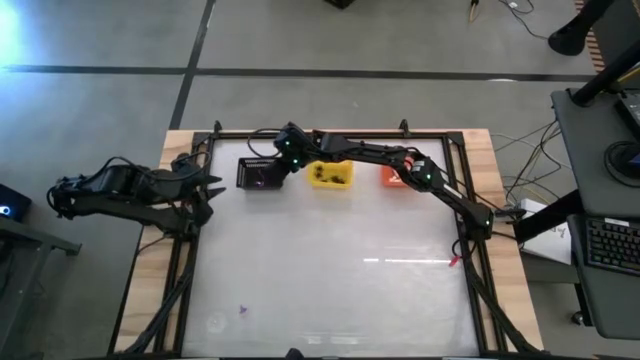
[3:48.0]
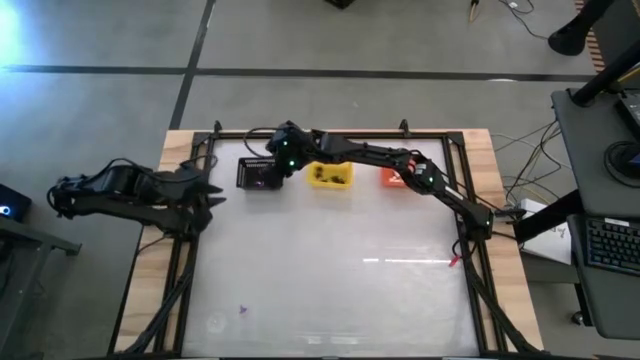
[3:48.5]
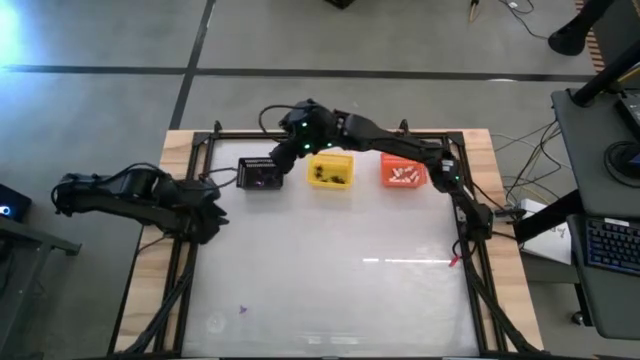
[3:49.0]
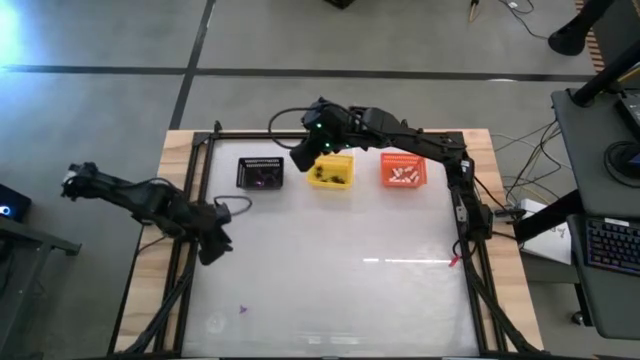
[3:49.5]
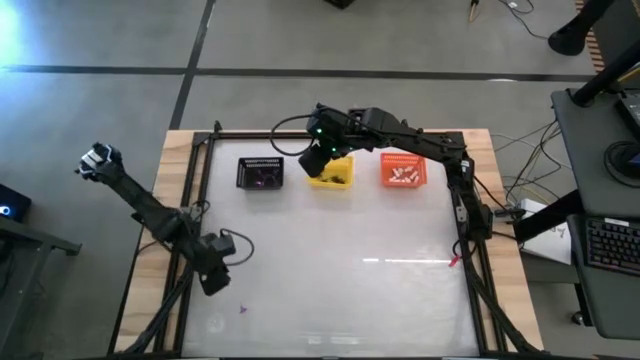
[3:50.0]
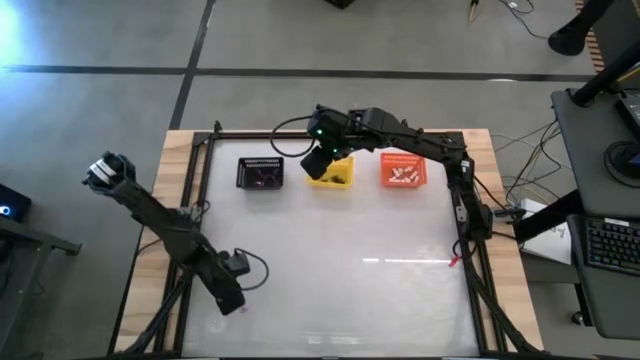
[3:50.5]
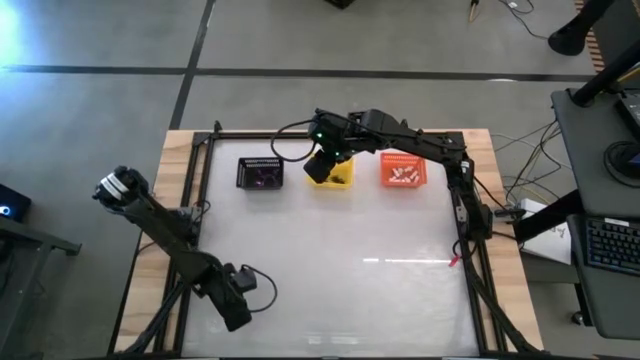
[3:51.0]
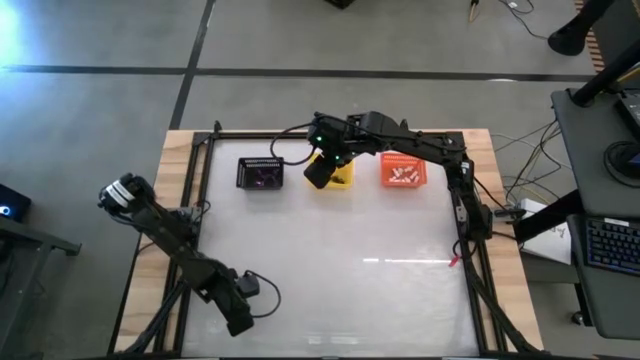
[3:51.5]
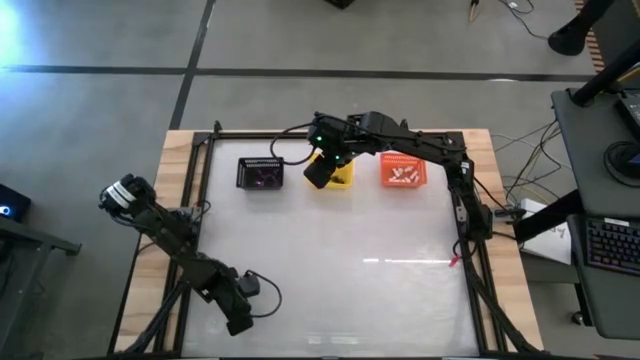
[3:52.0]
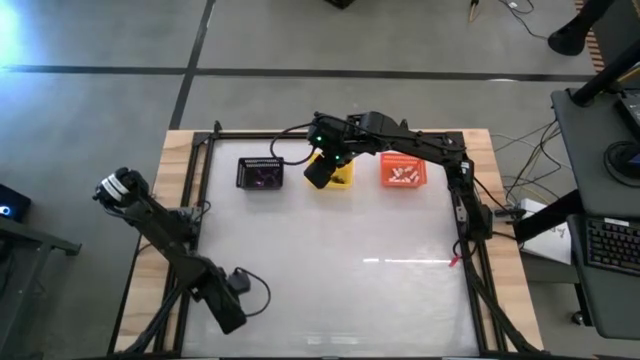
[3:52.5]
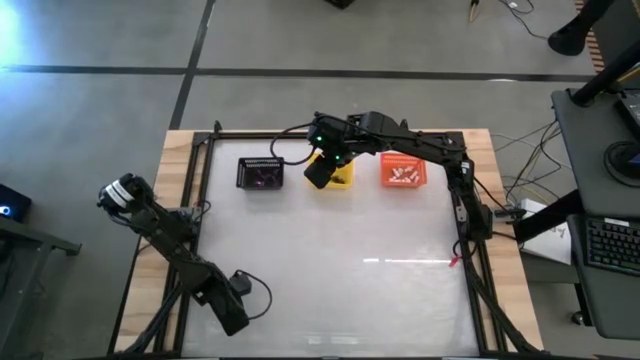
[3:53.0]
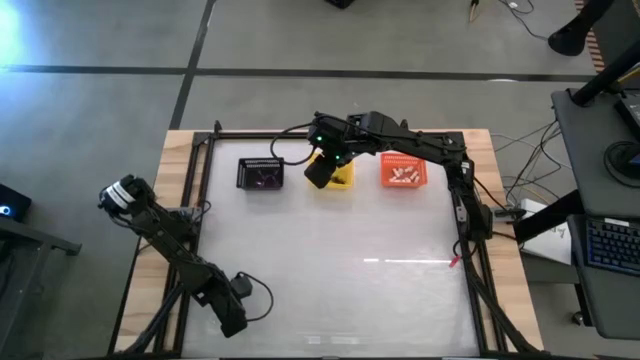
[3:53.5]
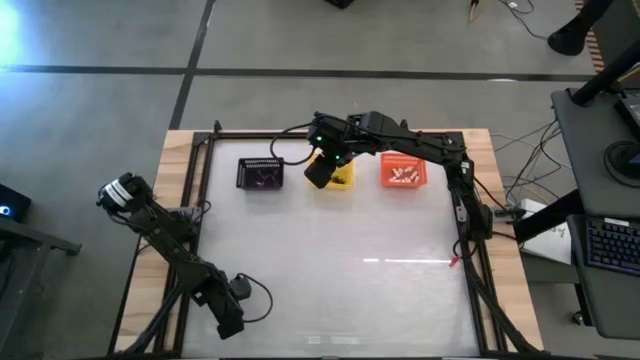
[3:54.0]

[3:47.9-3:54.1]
Task: Sort Halloween decoration
Put the violet hat toy into the black bin

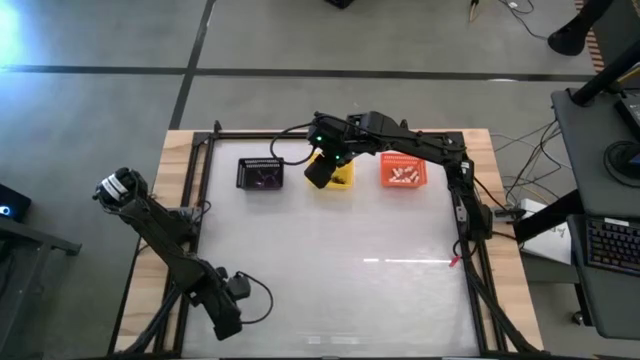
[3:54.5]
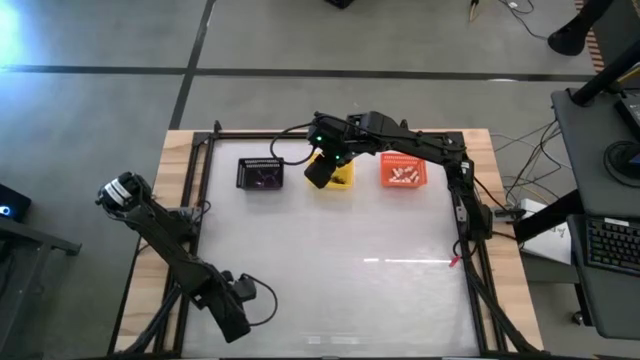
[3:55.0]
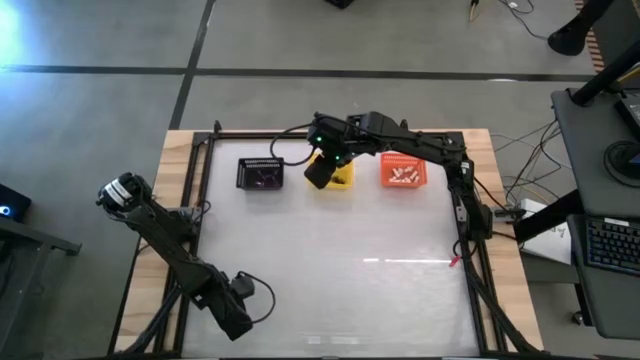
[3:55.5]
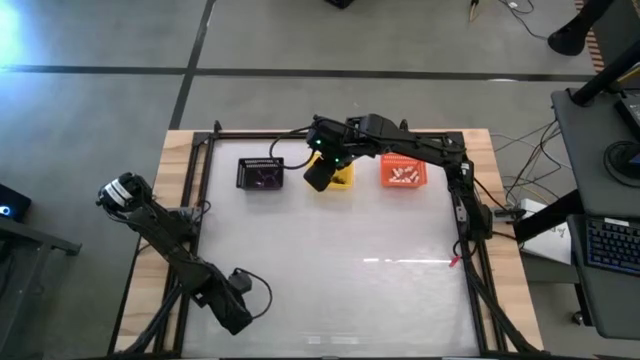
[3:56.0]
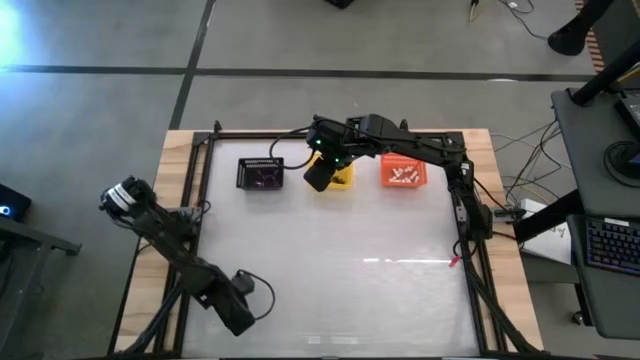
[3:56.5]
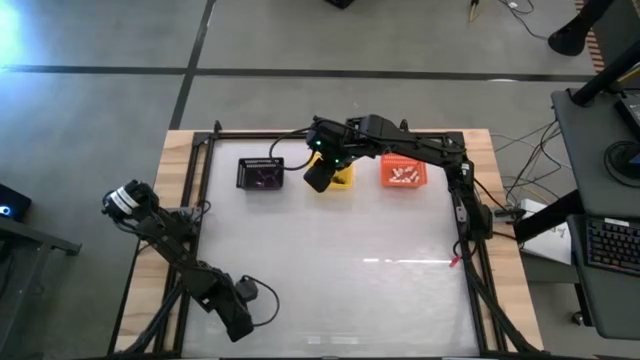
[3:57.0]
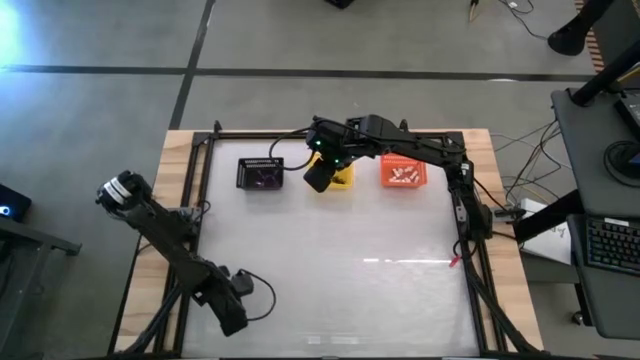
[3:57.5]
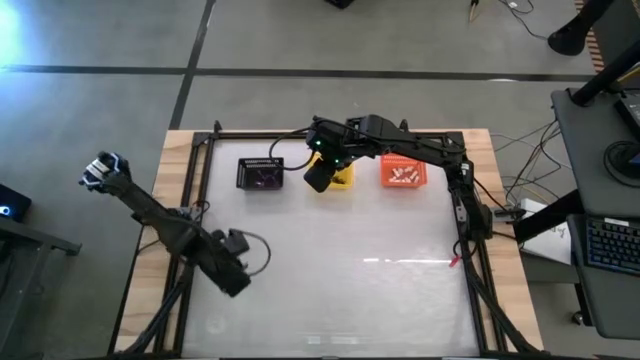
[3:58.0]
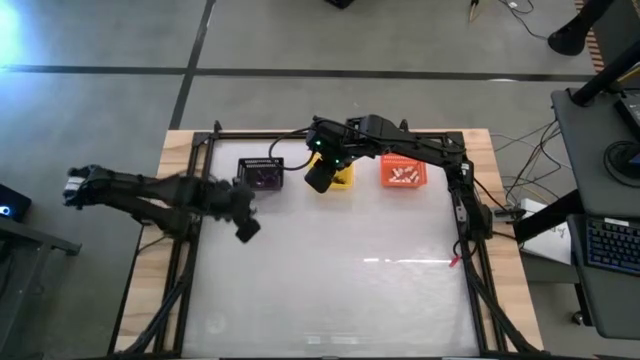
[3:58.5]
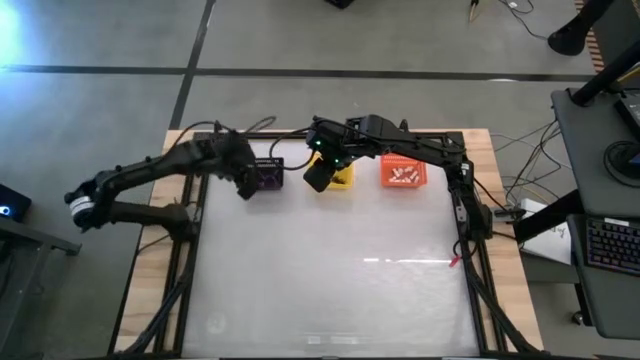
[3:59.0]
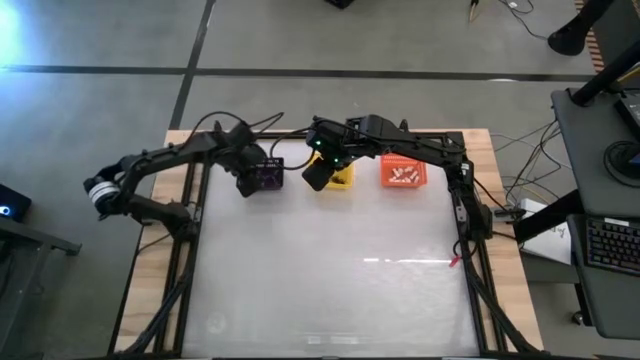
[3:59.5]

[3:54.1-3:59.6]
Put the violet hat toy into the black bin

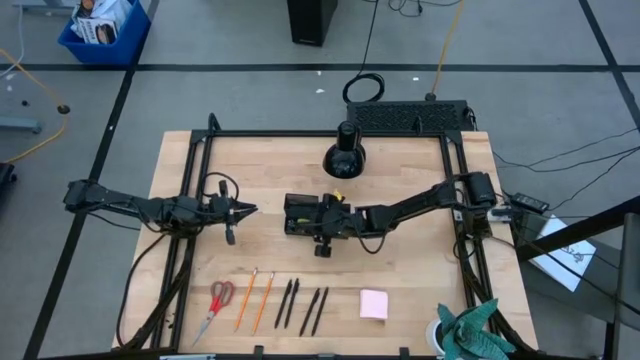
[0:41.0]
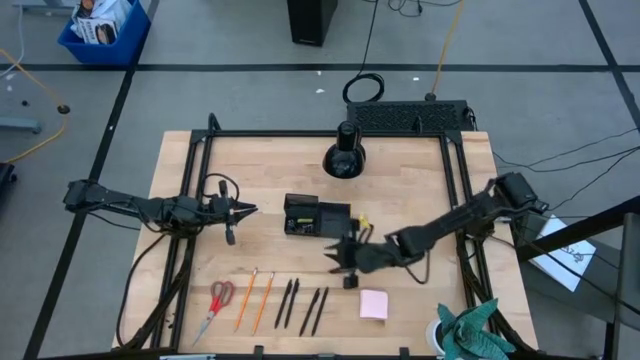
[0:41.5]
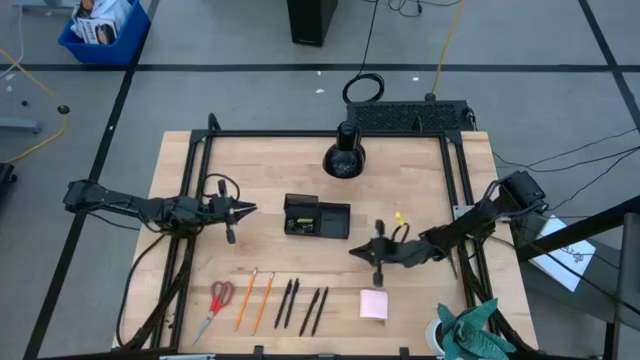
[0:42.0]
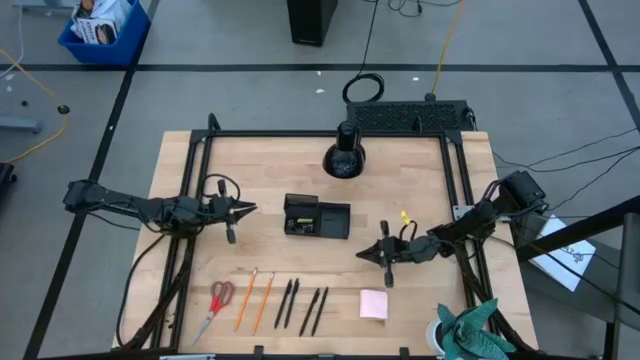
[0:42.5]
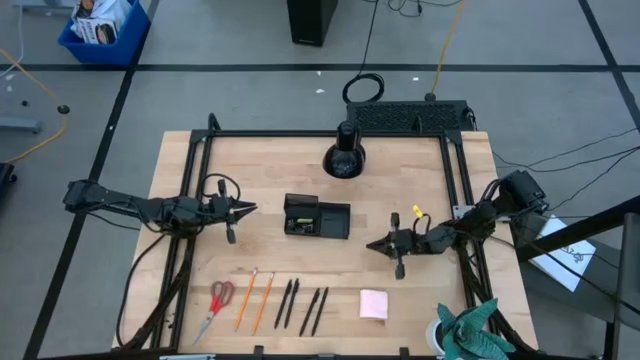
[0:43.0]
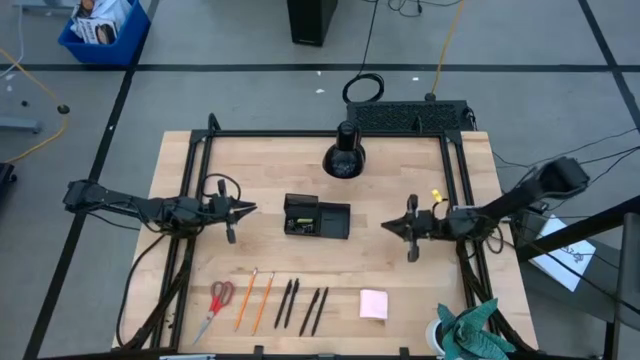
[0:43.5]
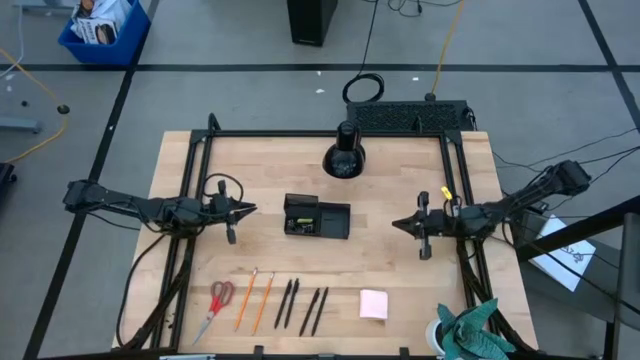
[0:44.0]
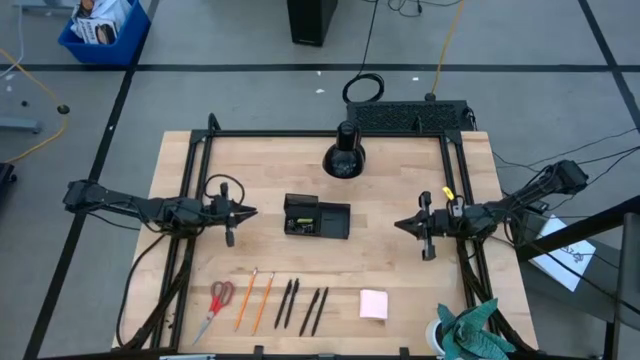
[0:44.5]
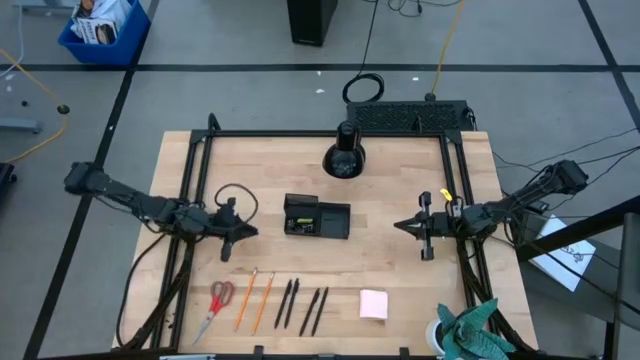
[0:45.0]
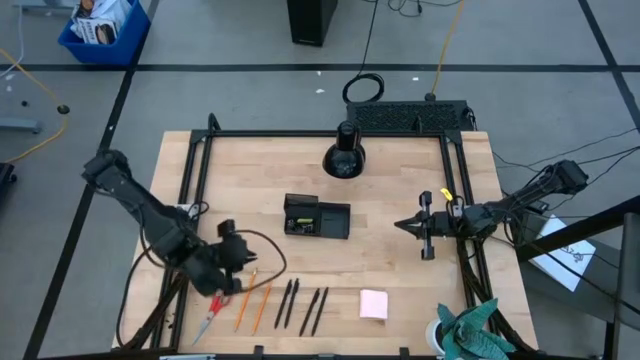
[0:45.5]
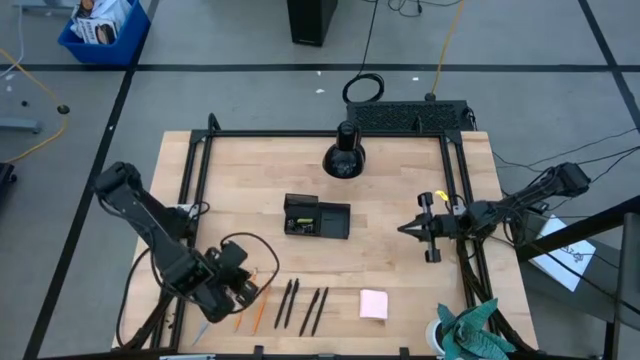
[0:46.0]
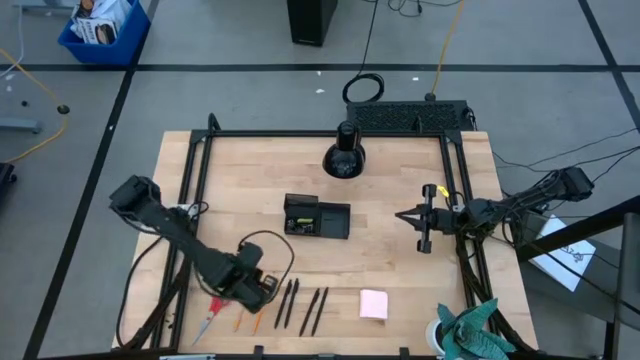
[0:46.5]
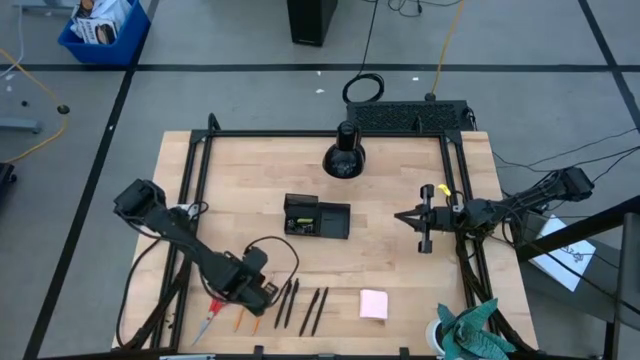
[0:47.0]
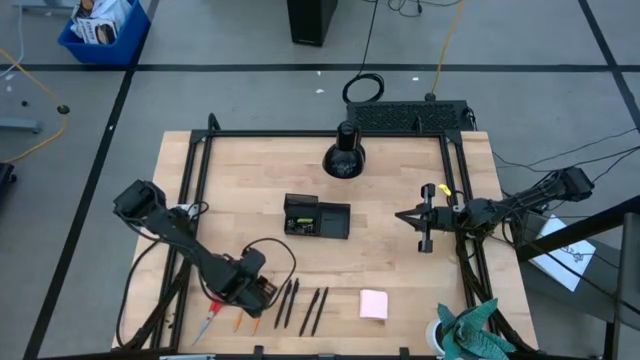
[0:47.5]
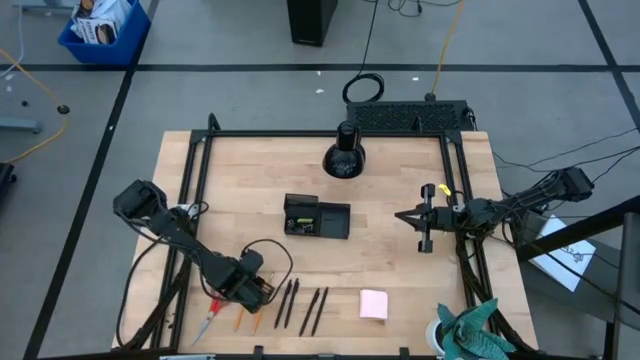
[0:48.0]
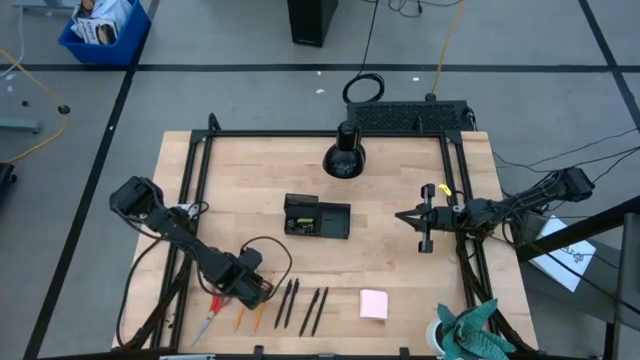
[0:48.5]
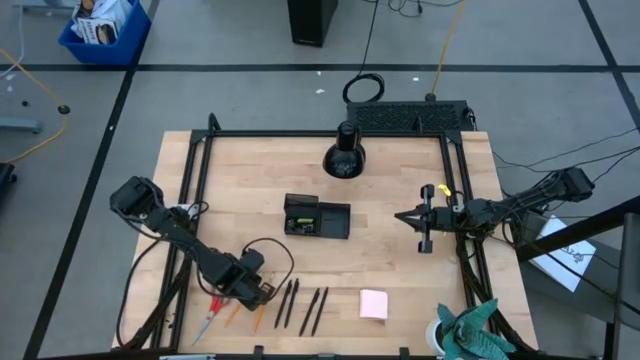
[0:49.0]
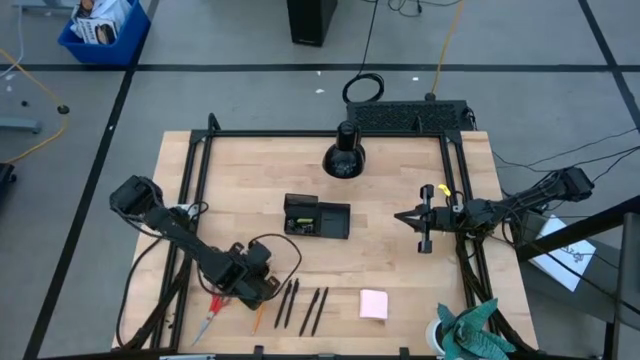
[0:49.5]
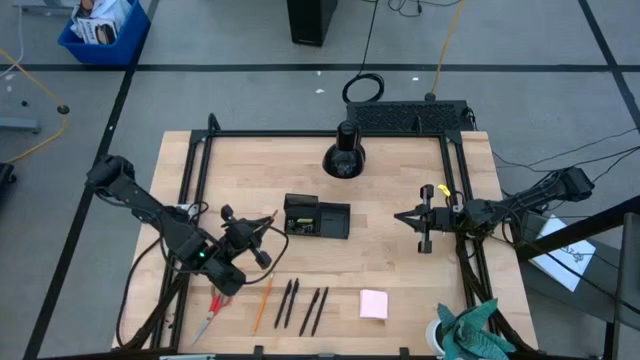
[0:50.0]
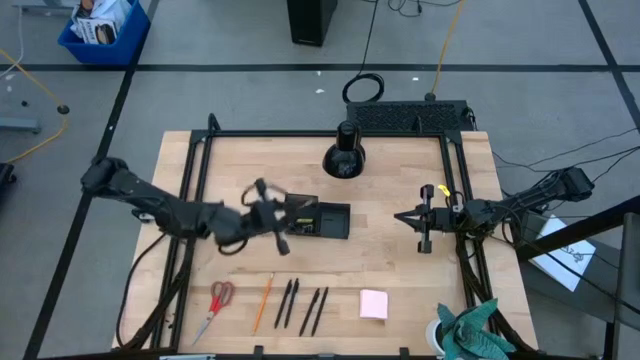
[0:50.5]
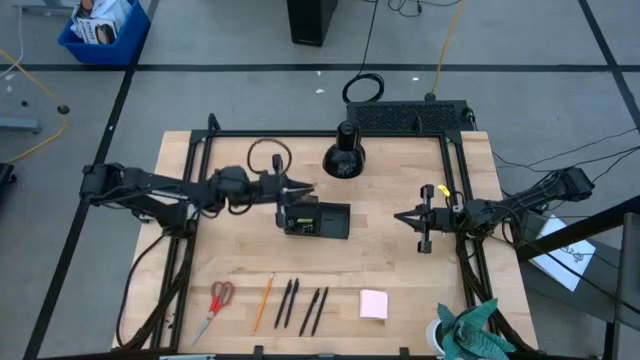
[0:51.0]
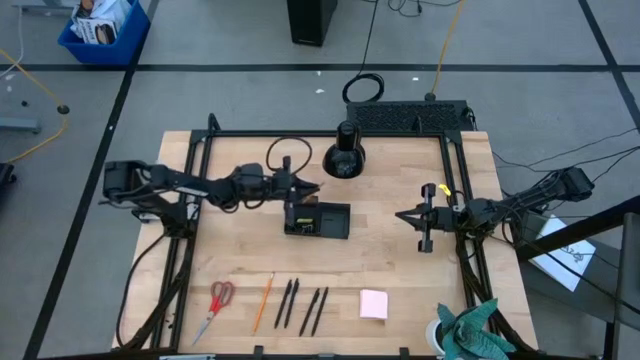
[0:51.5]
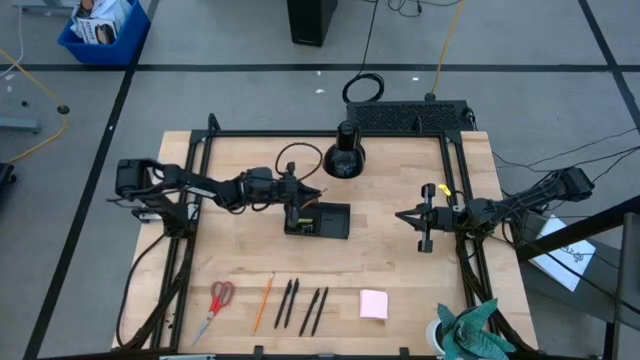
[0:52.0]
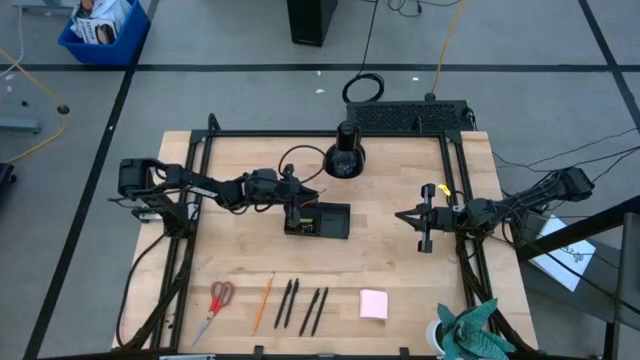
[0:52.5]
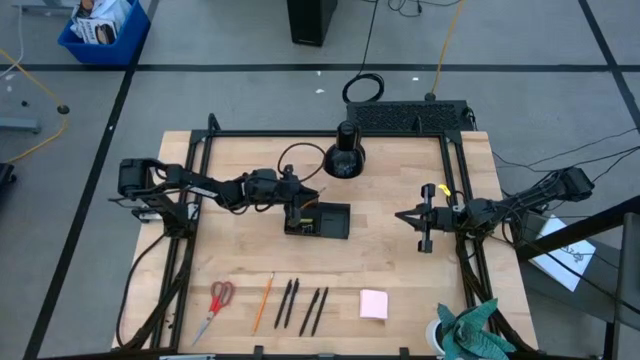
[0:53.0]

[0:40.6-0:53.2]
Task: Pick and place office supplies into organizer
Put the left pencil into the desk organizer
